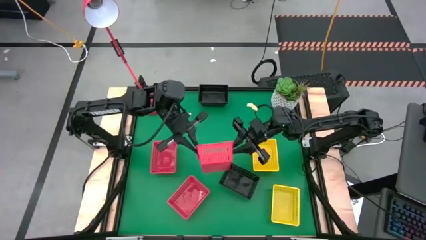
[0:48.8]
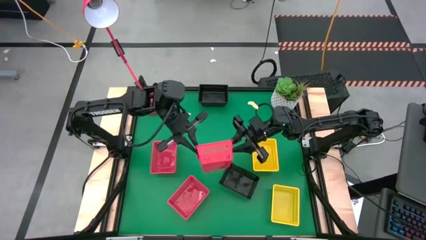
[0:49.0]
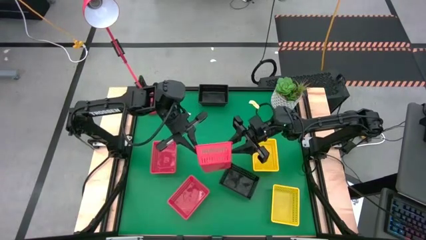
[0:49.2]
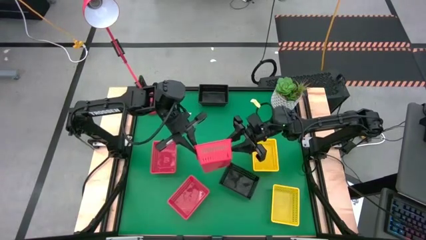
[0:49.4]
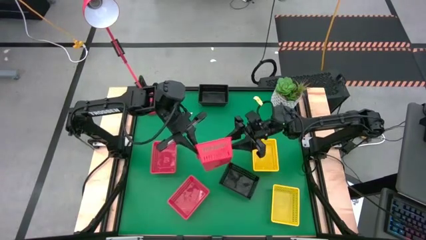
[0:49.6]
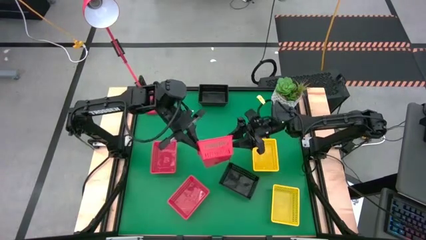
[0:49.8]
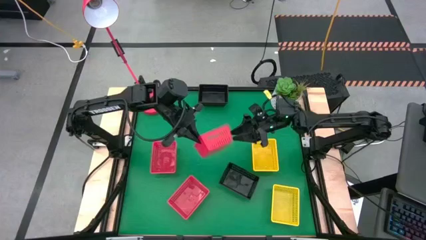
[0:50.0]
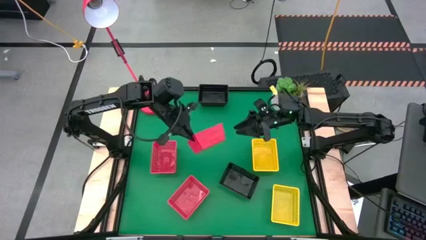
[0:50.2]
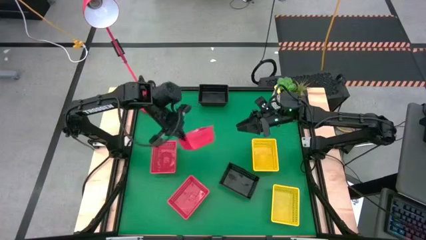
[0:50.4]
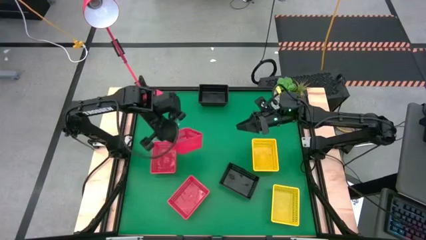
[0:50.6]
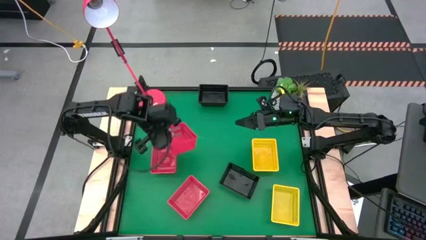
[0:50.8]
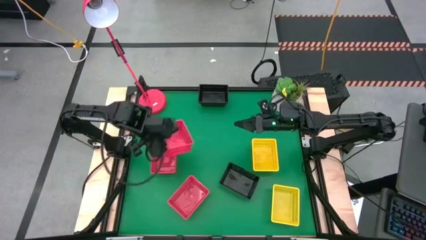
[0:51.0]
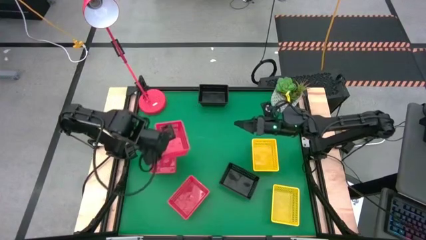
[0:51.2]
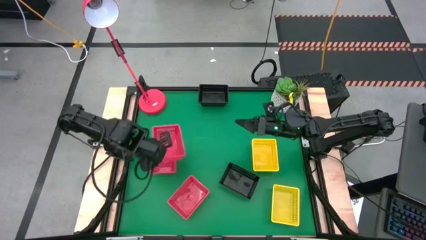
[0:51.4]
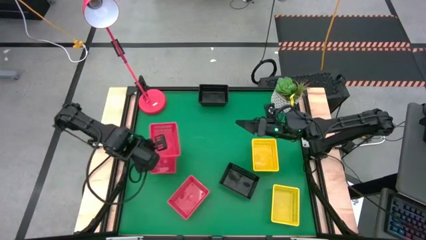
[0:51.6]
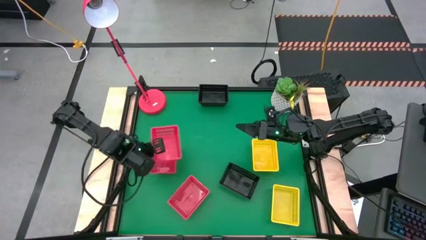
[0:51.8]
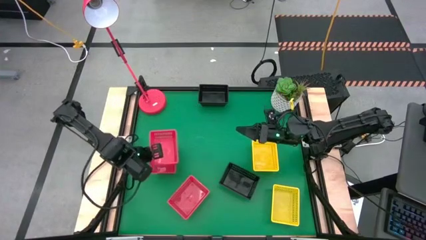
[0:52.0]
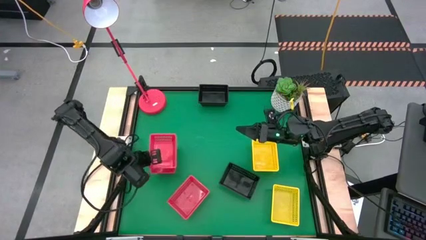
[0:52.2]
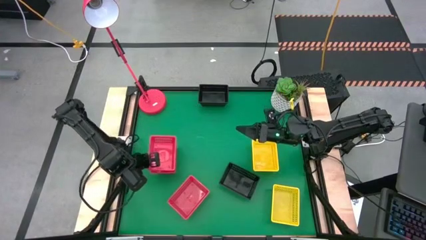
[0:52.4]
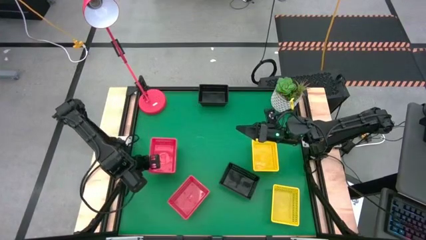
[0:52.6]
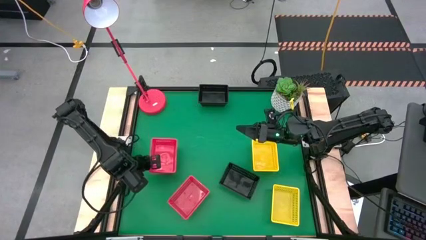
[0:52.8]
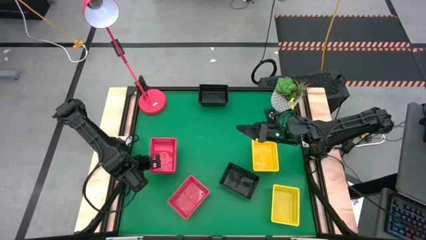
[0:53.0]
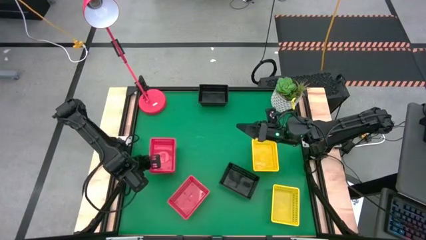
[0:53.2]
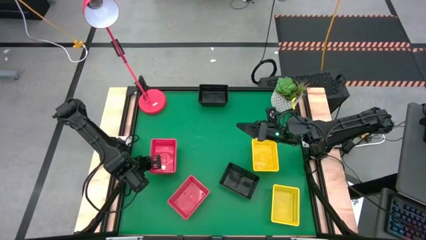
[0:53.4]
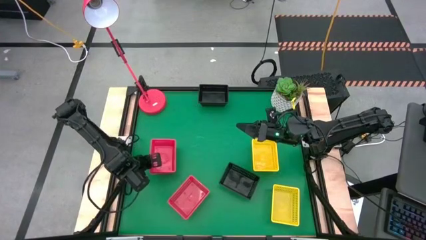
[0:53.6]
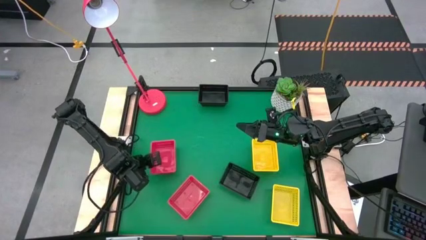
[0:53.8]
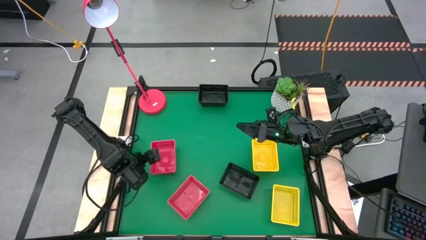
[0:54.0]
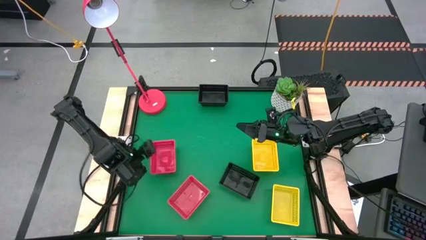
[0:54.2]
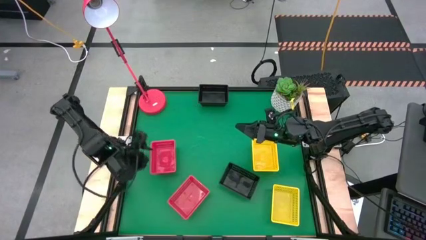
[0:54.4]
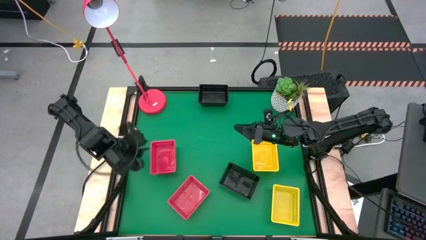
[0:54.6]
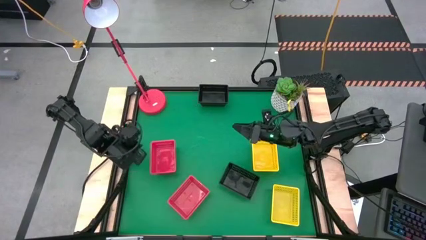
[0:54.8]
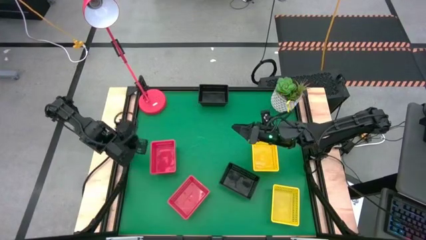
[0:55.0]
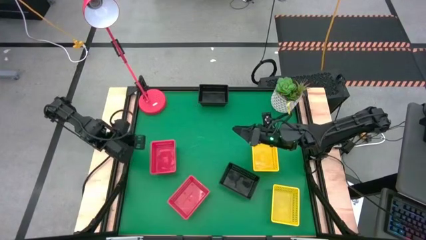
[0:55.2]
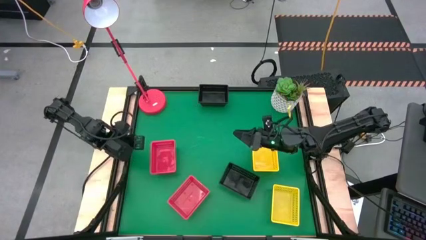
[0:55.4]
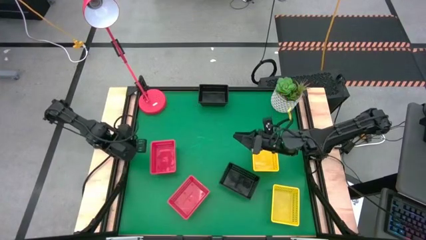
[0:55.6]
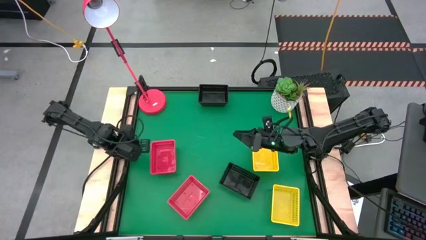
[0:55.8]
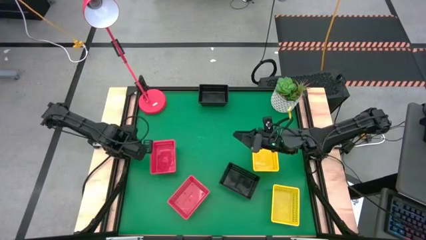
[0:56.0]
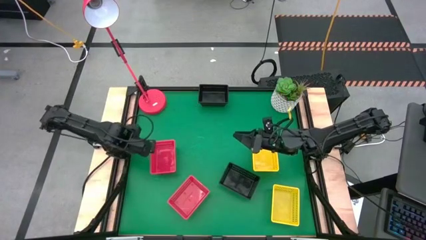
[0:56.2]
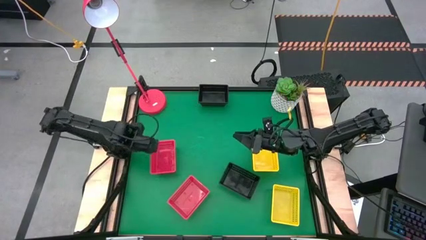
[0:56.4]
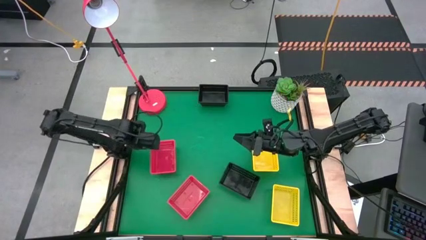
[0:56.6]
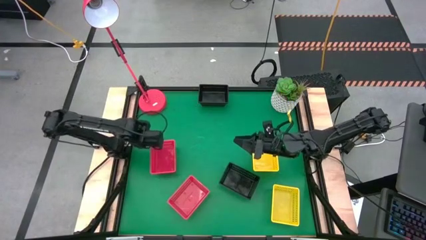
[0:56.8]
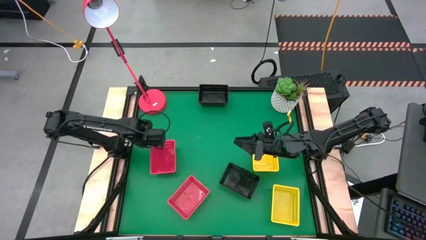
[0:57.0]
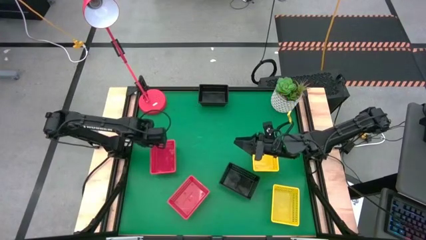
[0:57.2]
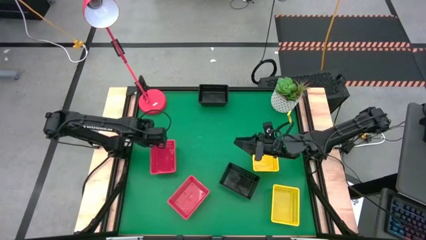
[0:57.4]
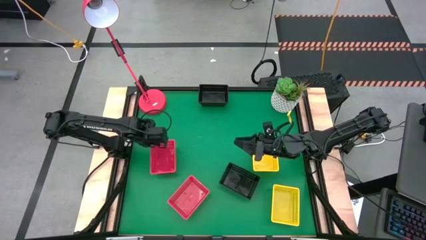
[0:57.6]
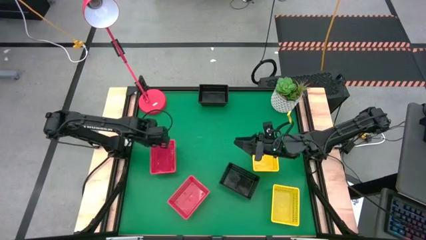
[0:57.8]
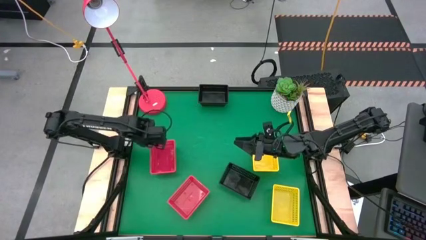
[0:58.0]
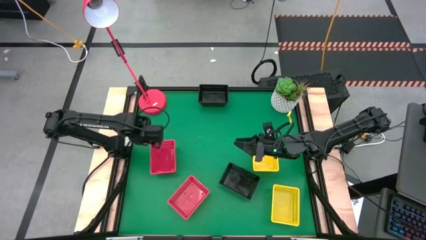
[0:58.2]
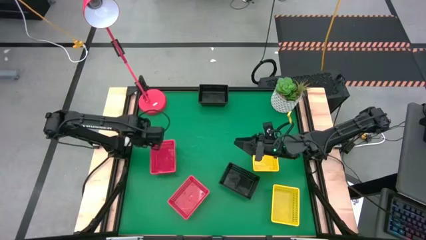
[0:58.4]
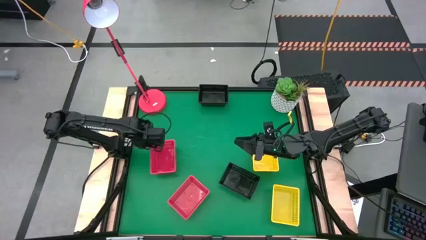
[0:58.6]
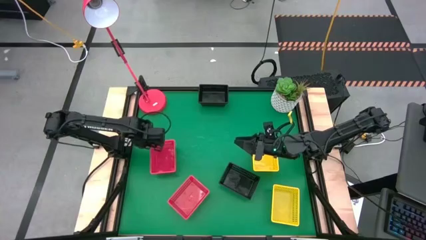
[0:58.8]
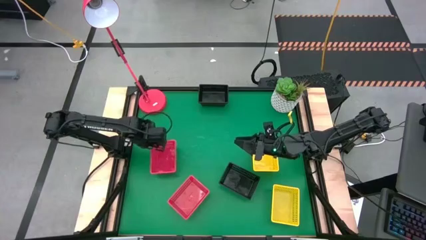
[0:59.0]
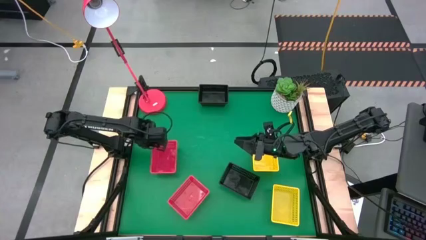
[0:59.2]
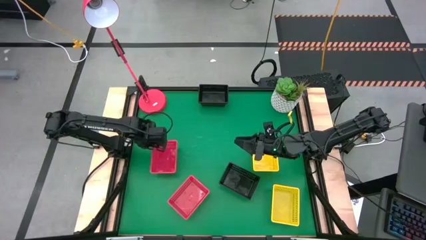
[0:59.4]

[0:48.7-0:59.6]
Stack the top red bin on the middle red bin
